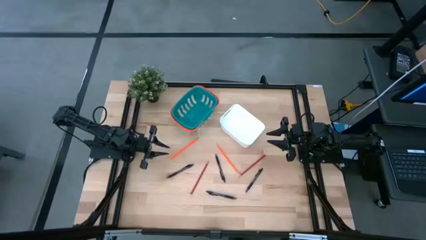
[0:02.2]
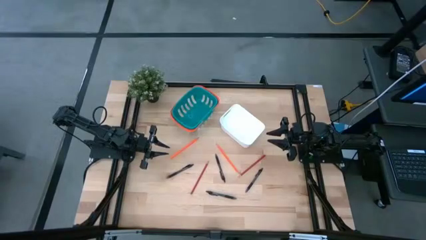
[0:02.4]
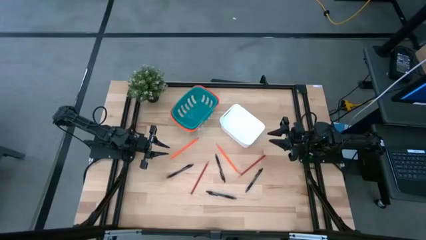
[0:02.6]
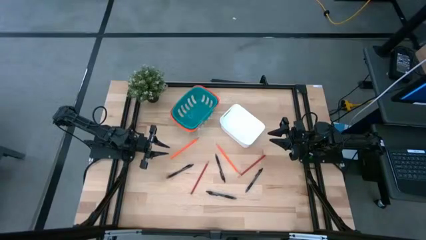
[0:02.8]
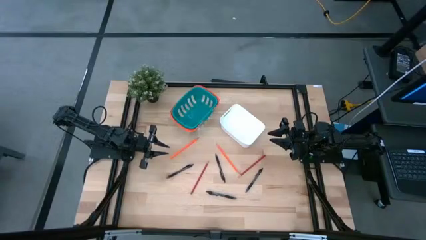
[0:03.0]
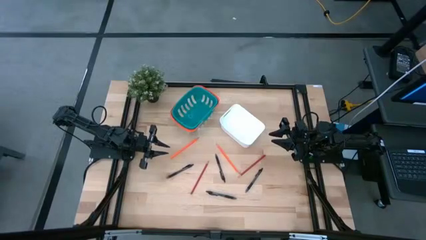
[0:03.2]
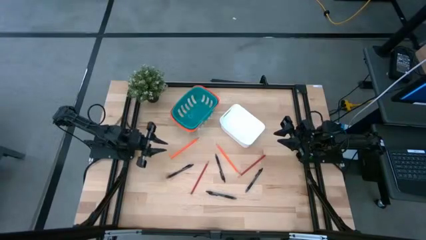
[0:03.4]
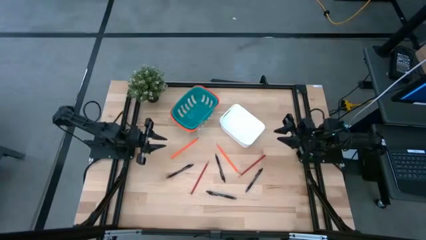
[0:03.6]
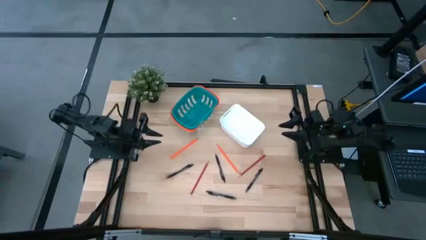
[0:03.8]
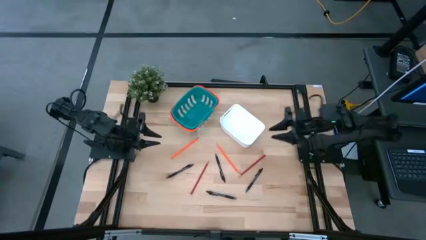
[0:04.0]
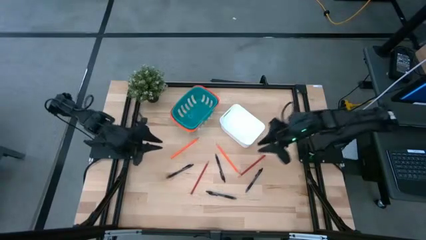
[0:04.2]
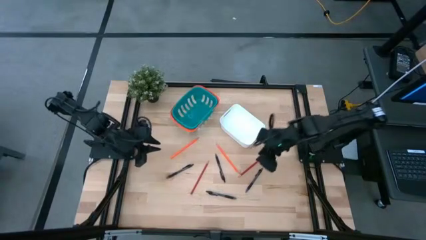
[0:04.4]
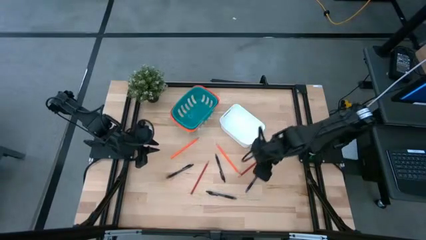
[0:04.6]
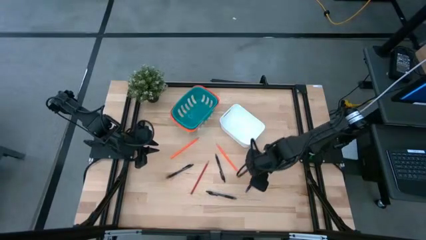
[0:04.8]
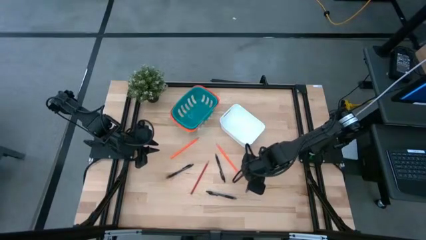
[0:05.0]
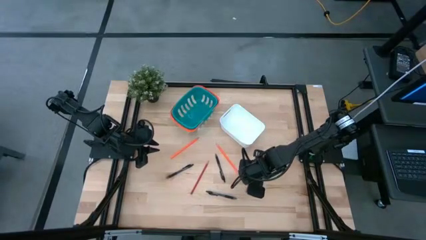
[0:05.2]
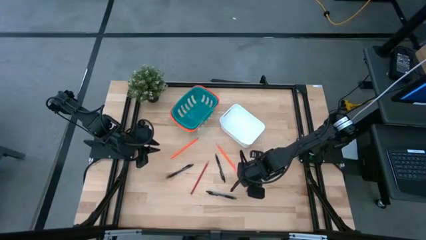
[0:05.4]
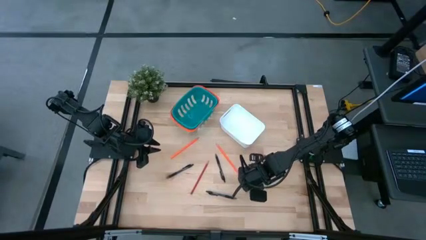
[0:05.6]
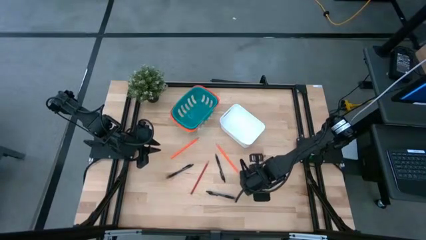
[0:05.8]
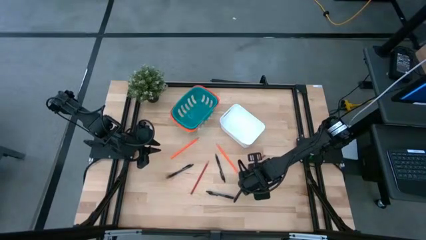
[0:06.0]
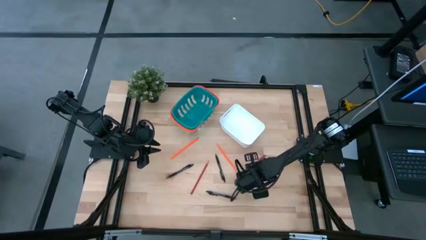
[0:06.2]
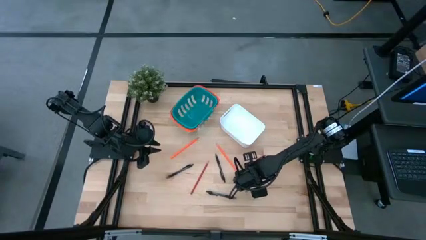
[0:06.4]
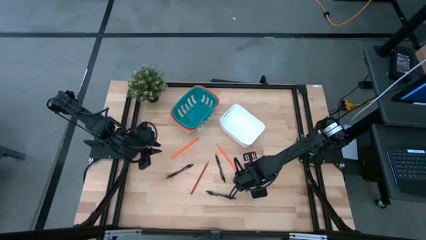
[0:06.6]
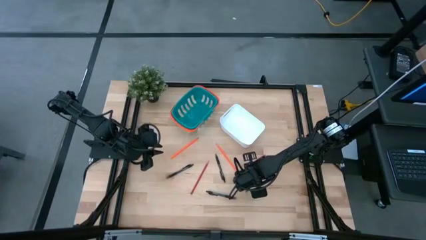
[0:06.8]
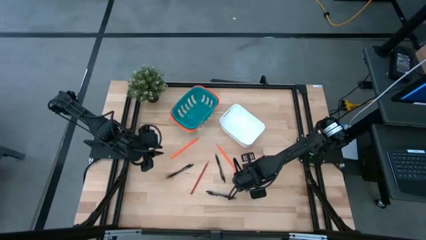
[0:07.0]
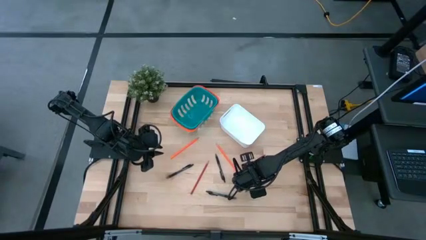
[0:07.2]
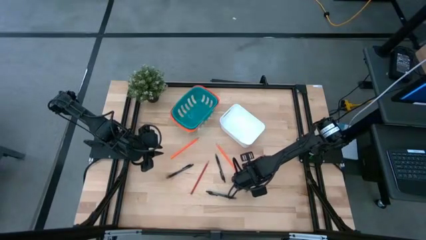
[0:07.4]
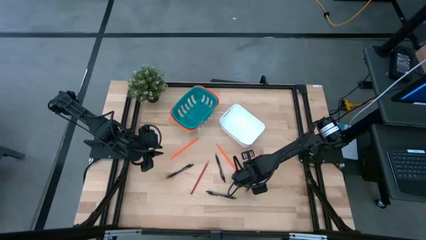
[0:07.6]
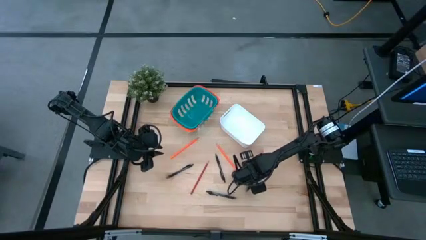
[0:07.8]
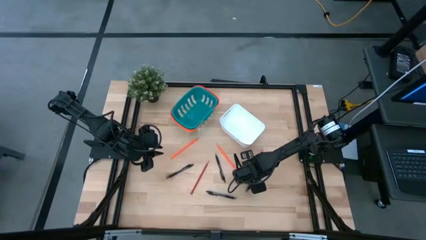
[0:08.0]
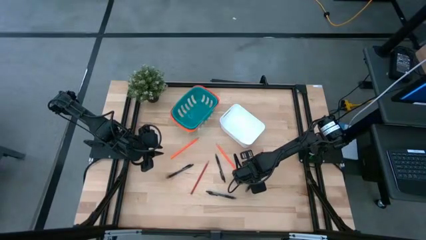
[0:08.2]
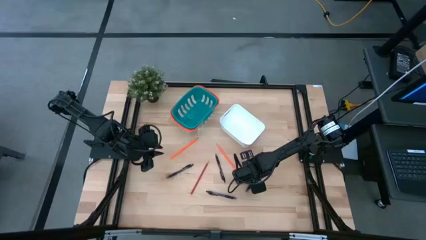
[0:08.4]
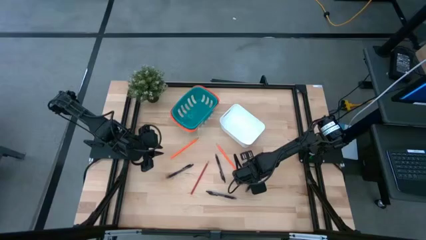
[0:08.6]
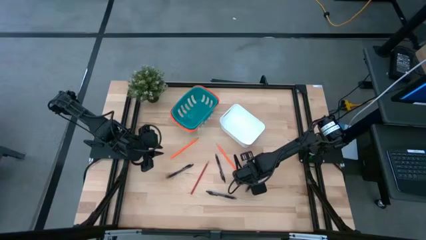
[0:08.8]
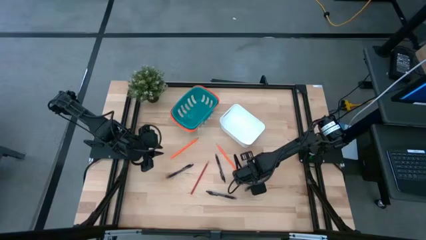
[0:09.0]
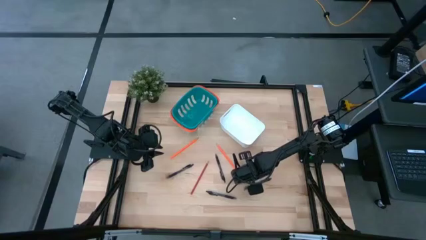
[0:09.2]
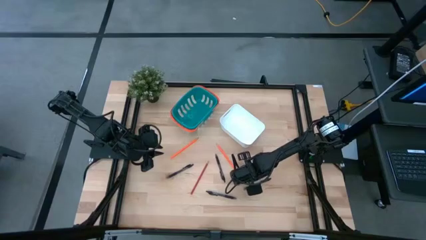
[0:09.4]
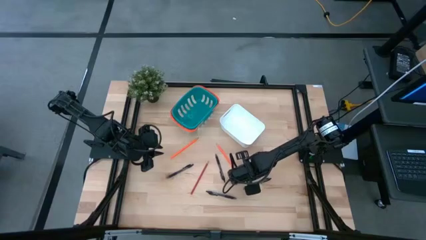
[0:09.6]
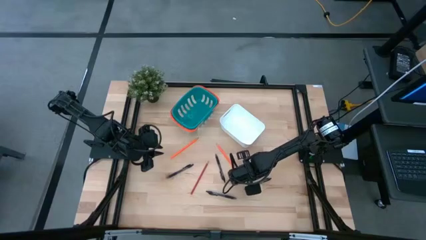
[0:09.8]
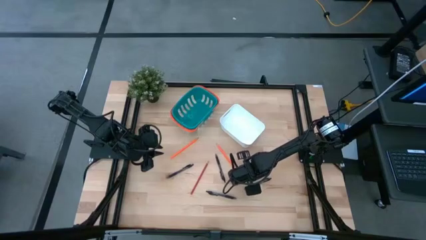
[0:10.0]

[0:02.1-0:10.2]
Task: Sort pens & pencils
Put the right red pencil into the blue bin

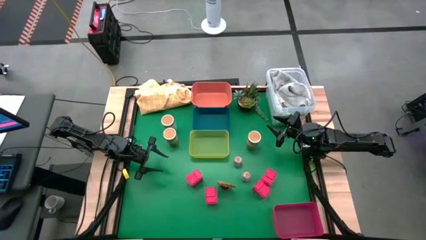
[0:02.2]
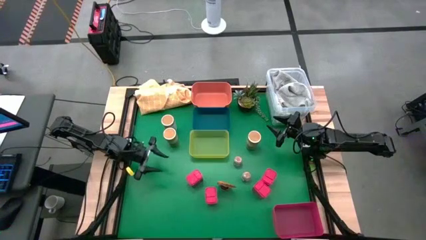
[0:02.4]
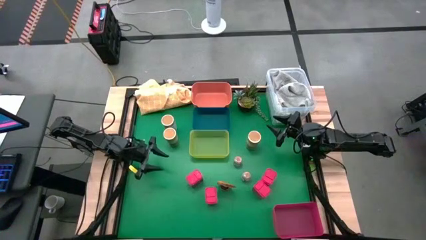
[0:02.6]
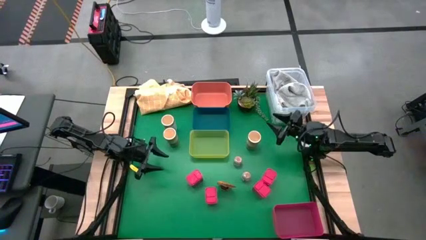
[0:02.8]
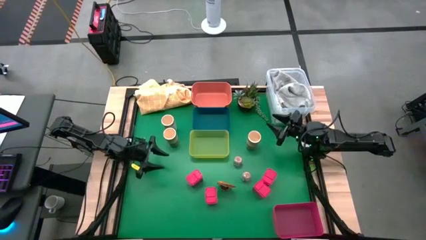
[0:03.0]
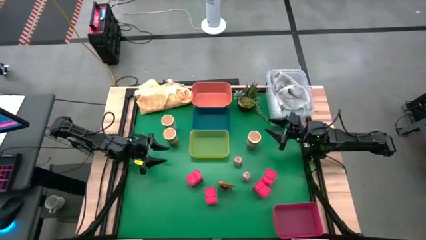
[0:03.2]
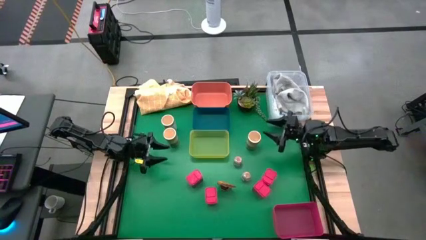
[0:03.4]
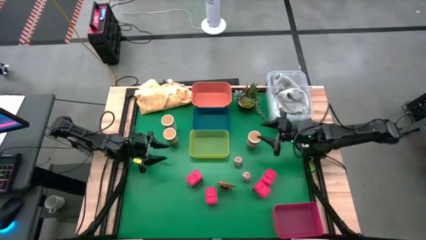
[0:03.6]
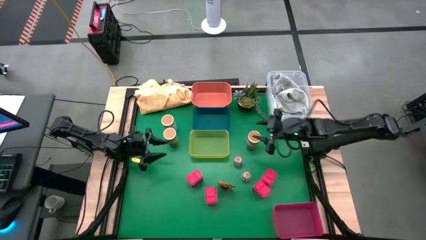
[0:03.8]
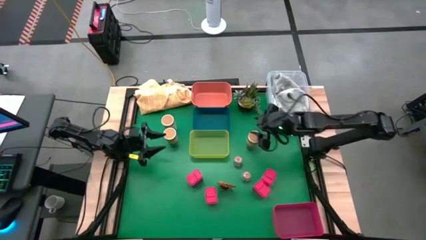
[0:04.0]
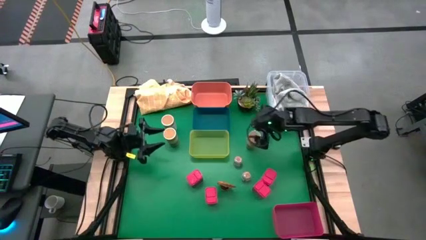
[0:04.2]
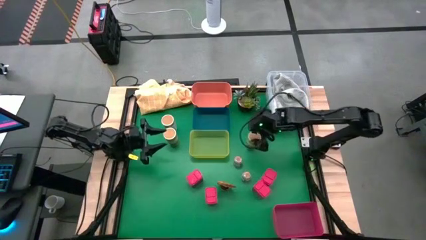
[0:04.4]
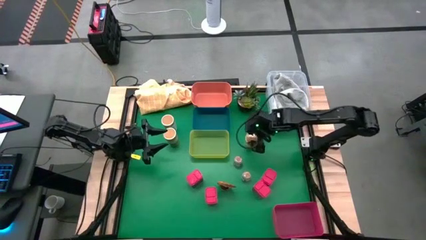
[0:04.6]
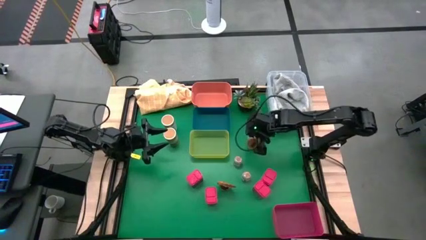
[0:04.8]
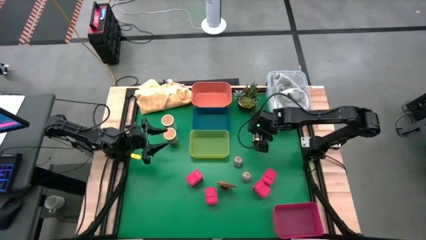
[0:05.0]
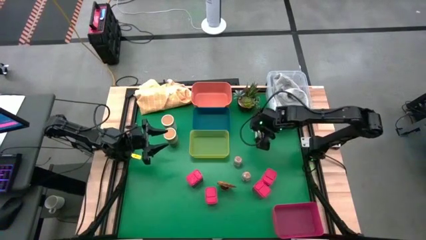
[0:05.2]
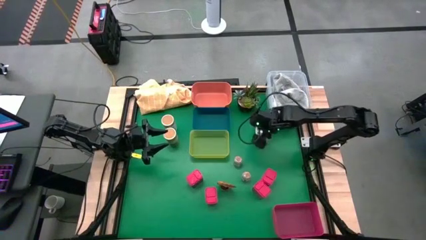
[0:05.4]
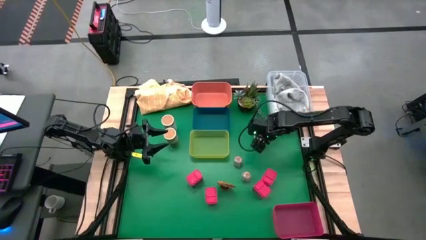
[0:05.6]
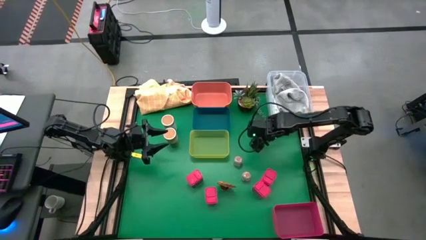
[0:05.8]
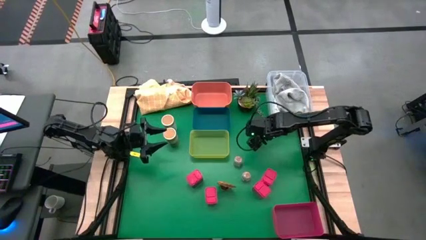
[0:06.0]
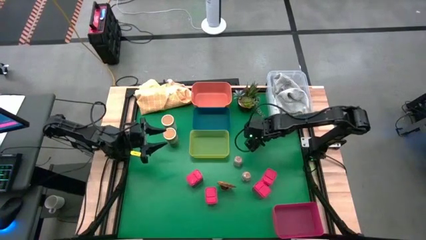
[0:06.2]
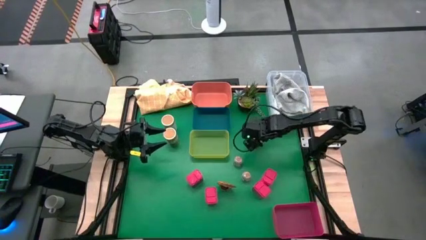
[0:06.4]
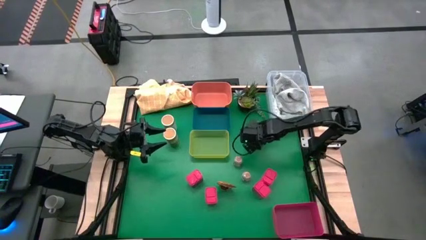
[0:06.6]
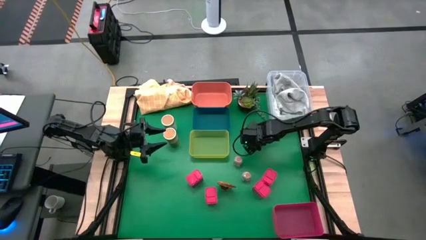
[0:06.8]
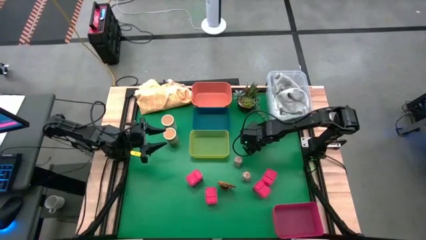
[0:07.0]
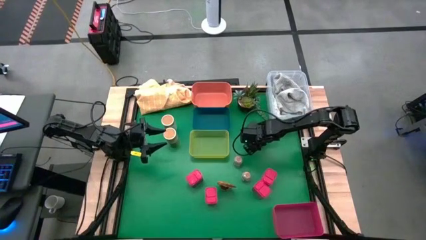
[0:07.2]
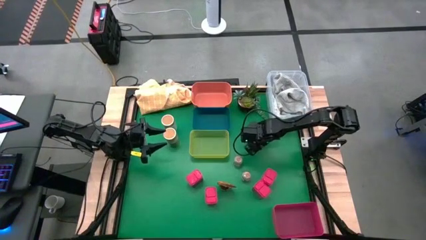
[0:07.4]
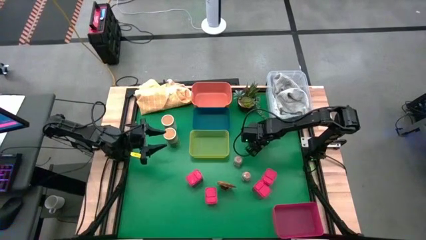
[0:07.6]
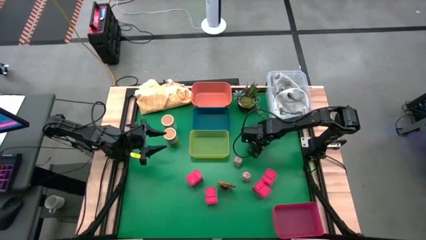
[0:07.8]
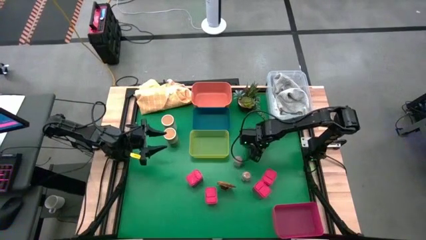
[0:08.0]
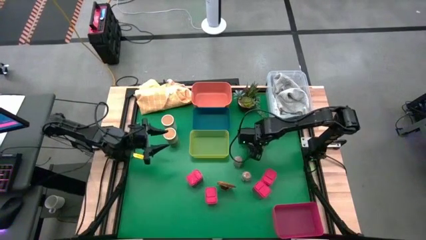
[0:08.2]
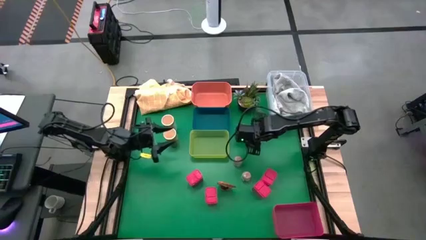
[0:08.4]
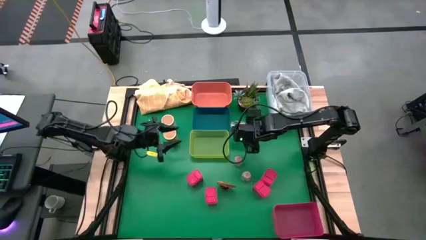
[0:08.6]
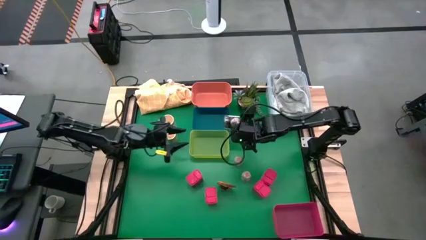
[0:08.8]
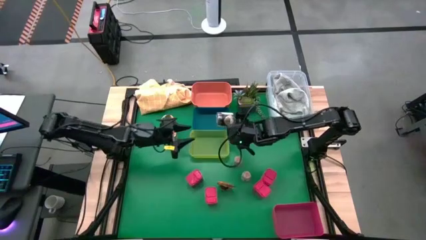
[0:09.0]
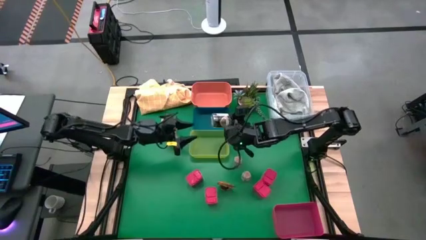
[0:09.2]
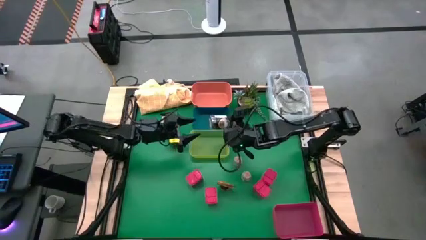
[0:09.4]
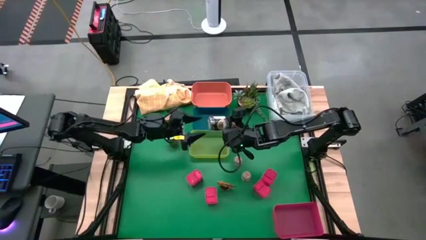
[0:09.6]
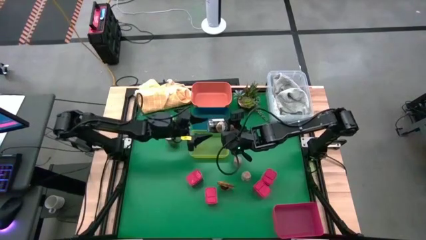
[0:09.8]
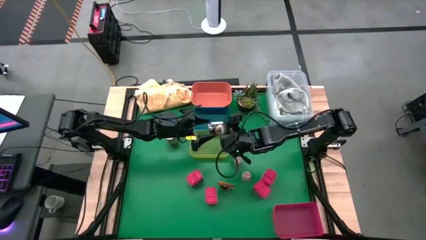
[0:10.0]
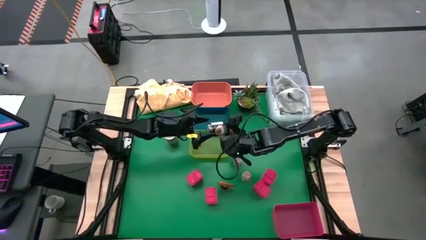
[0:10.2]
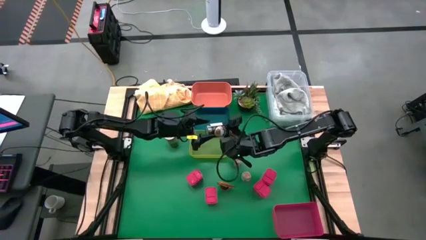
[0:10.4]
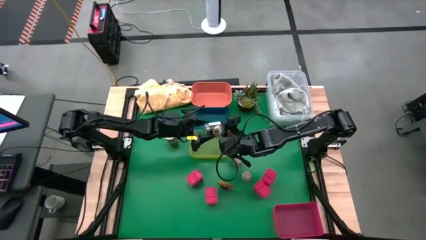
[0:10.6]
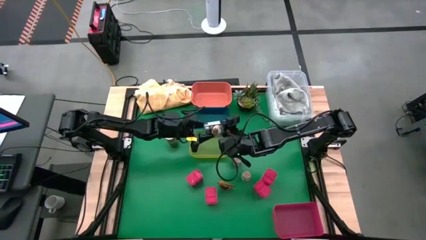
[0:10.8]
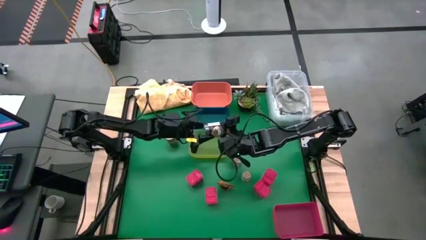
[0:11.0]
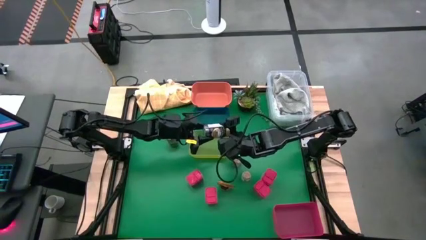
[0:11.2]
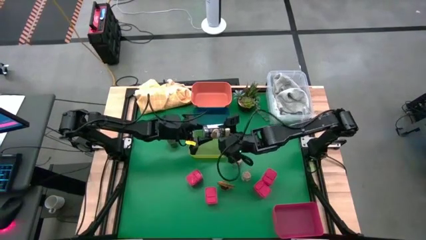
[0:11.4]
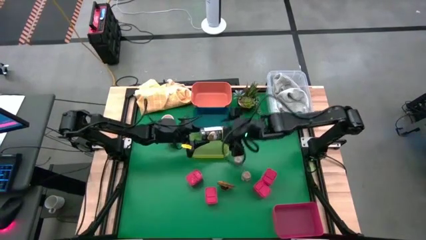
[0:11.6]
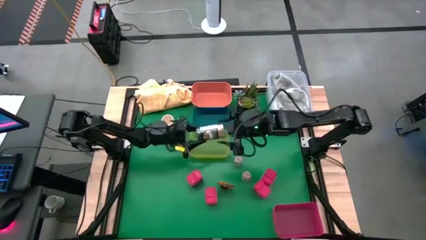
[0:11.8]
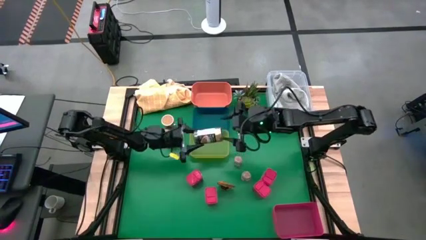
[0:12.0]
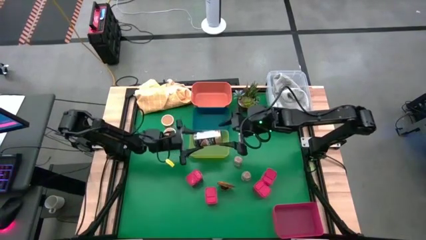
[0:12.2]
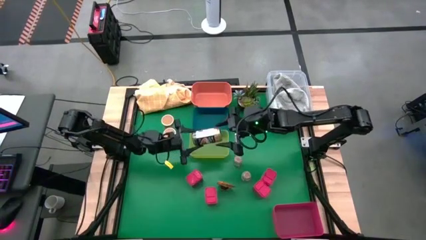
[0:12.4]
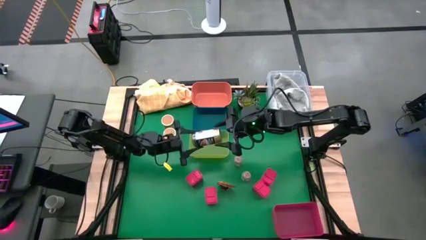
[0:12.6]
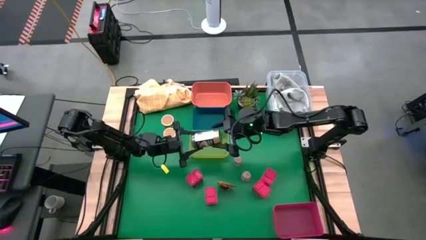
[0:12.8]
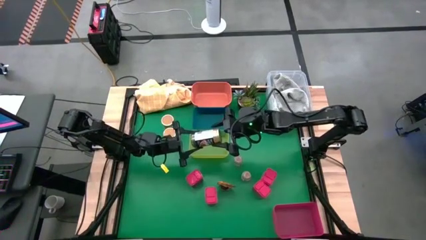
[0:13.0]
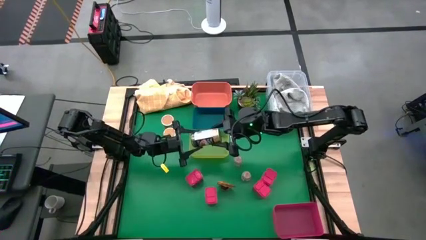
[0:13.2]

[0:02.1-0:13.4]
Task: Sort spices by type
Put the gold seasoning bottle into the pink bin
